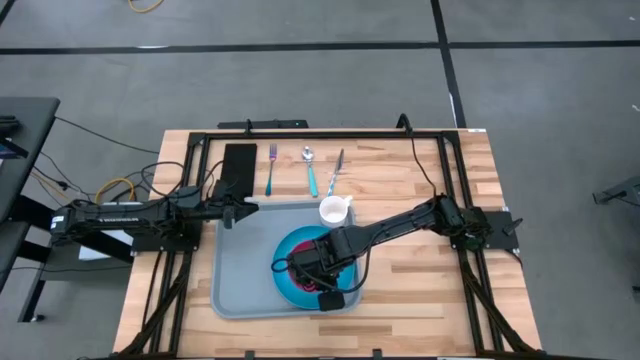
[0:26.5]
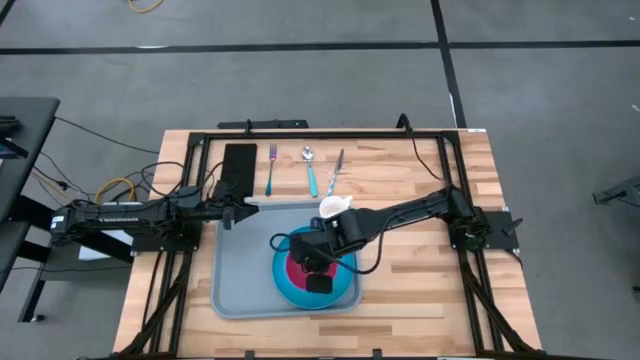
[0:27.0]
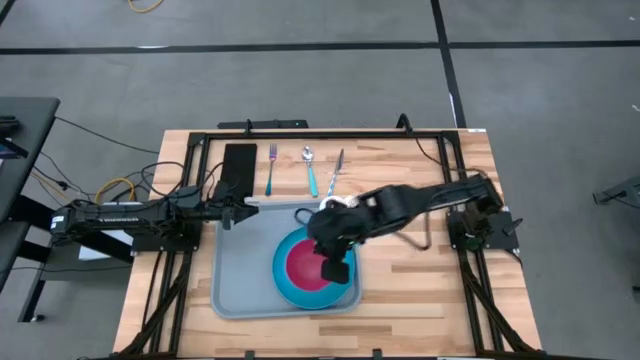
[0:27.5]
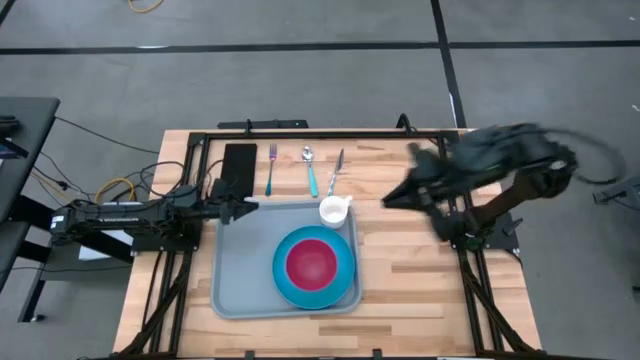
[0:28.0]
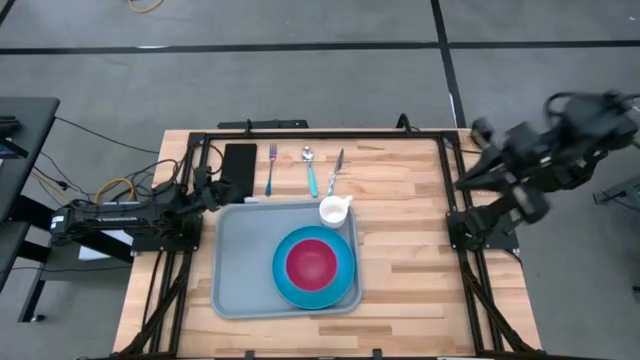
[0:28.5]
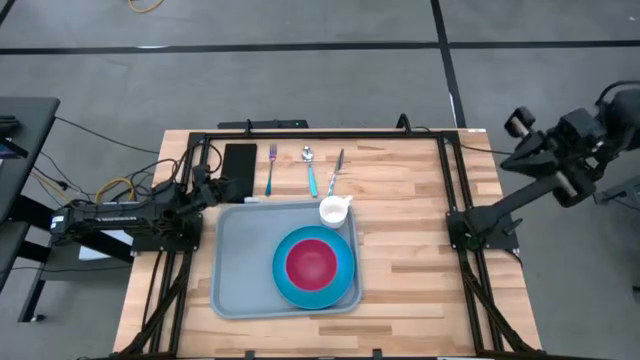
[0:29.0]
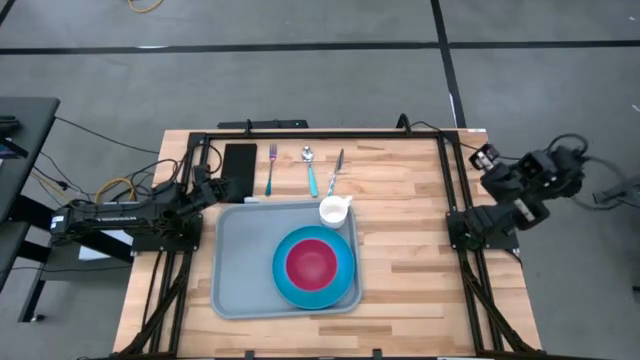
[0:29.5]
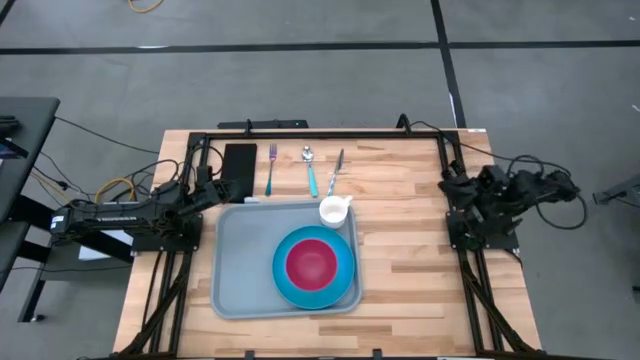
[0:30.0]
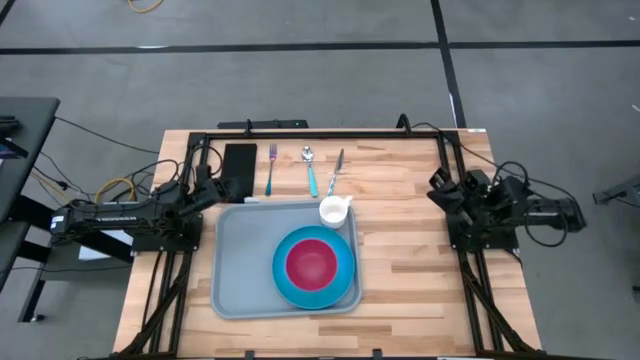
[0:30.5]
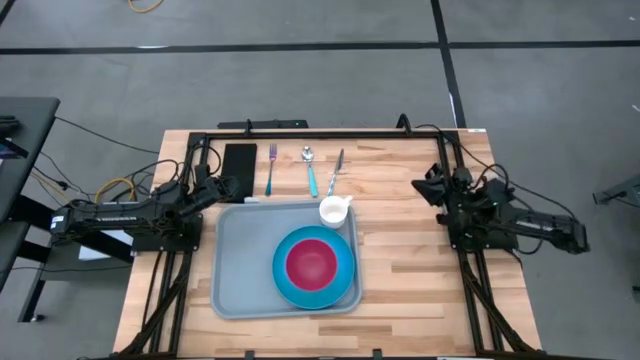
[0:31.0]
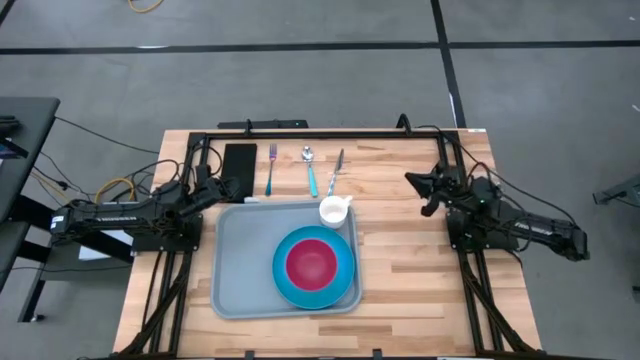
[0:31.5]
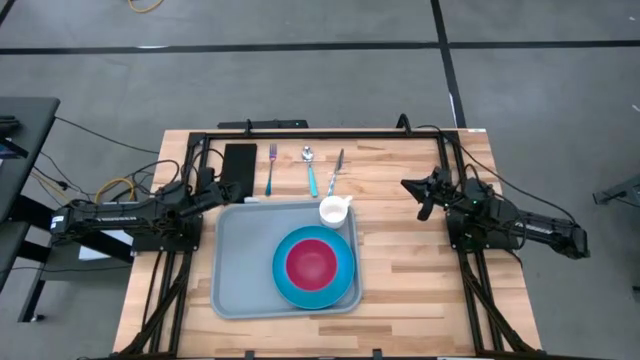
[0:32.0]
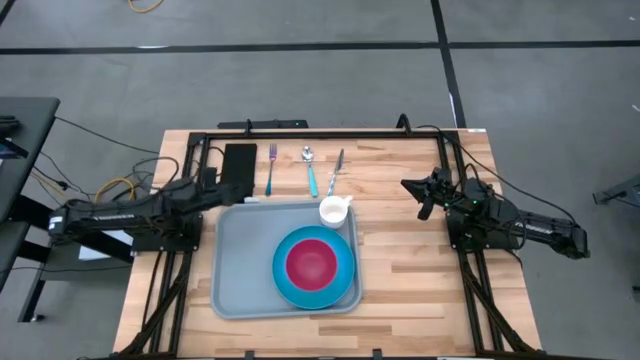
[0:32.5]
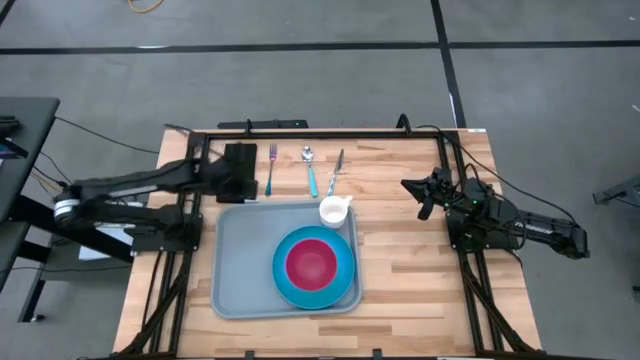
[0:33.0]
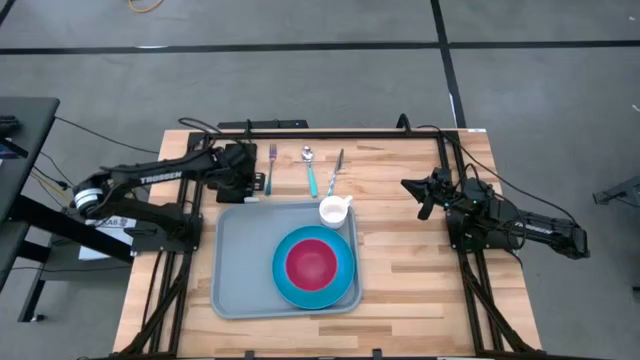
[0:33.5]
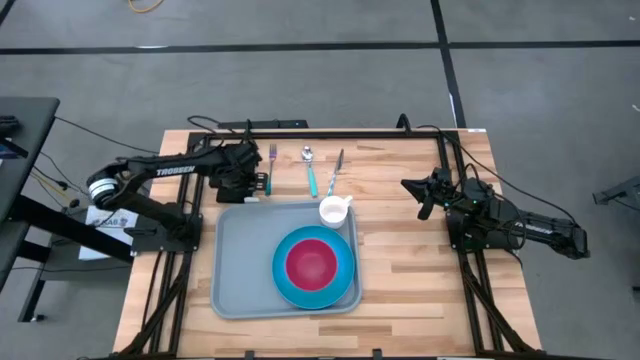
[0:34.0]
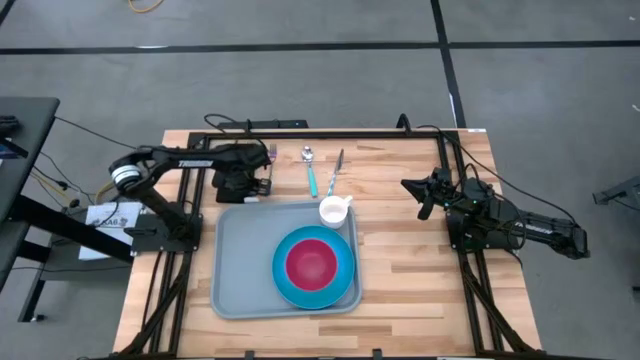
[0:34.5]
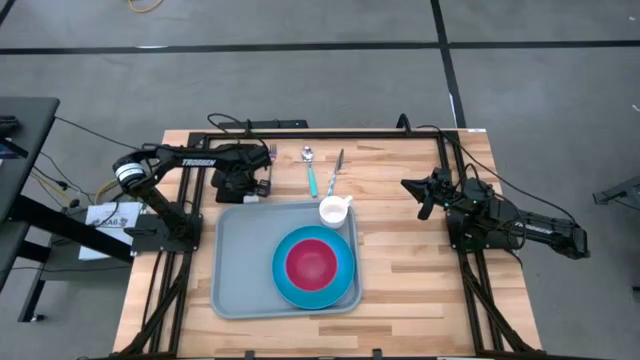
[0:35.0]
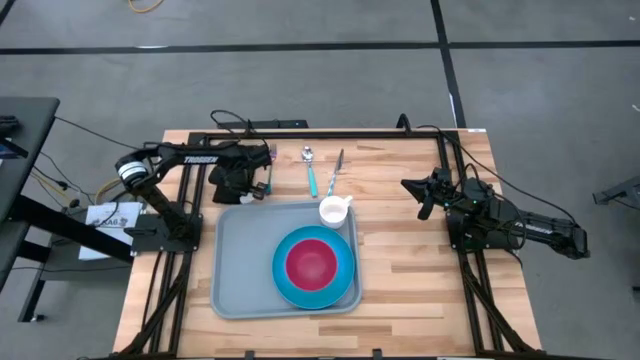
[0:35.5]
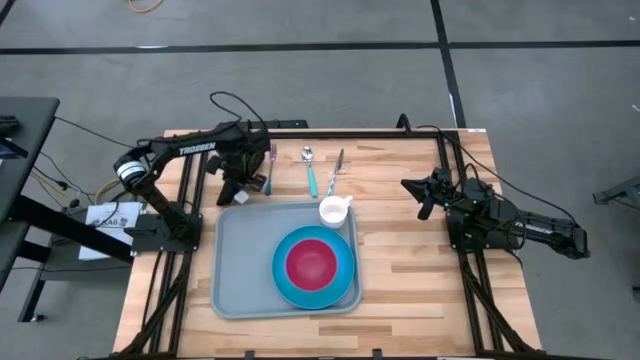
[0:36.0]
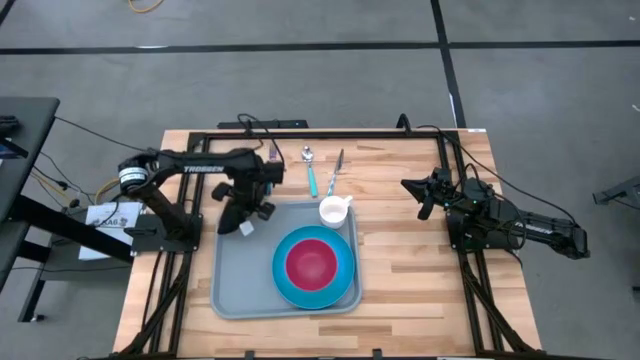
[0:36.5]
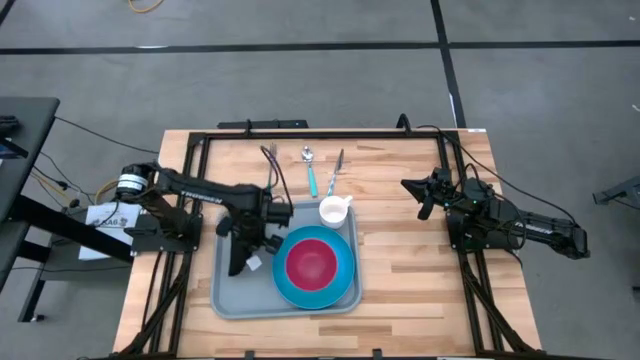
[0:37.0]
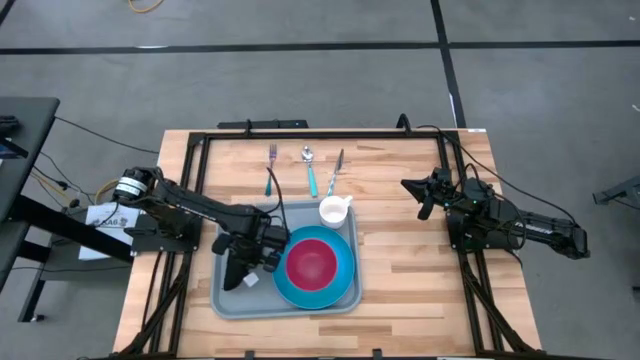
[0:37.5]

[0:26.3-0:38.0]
Task: Set up tray
Put the black napkin on the gray serving tray to the right of the blue plate

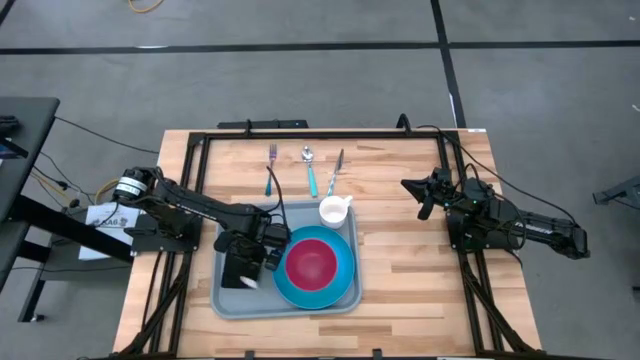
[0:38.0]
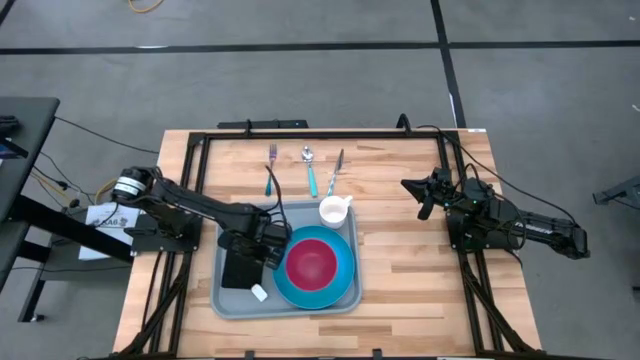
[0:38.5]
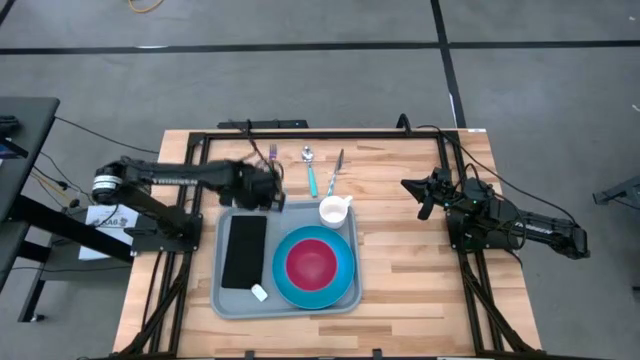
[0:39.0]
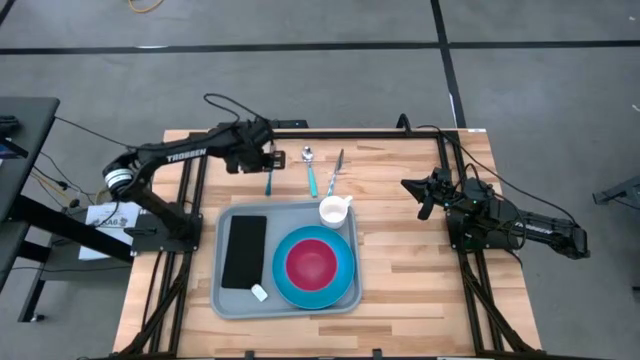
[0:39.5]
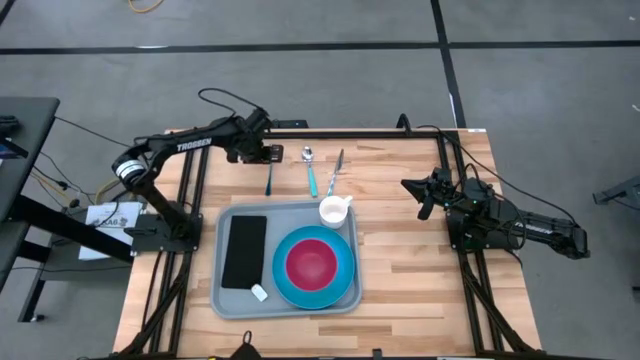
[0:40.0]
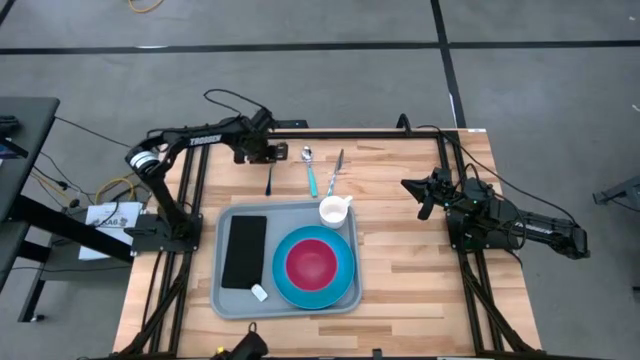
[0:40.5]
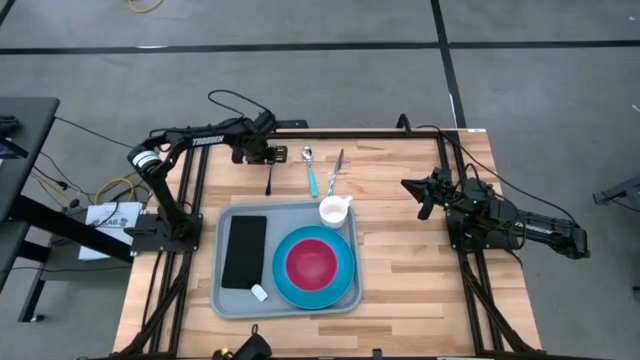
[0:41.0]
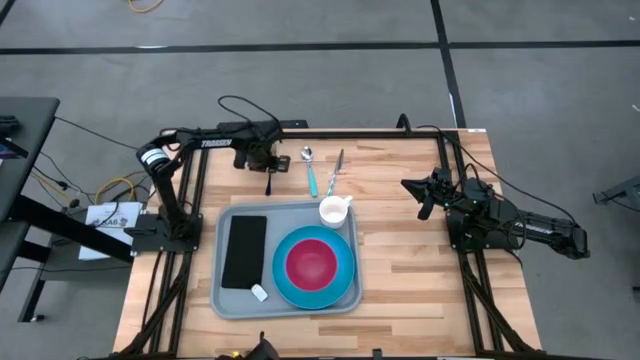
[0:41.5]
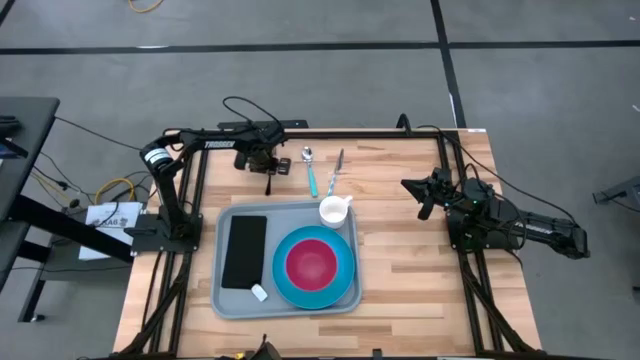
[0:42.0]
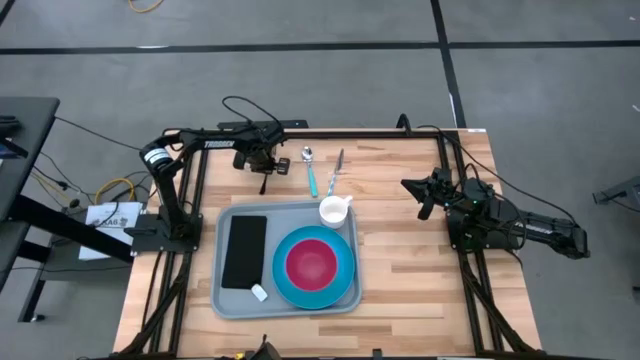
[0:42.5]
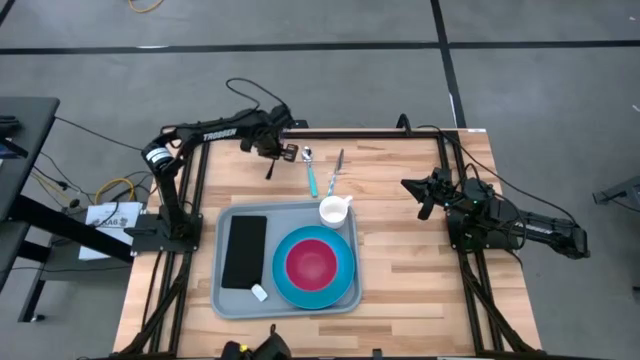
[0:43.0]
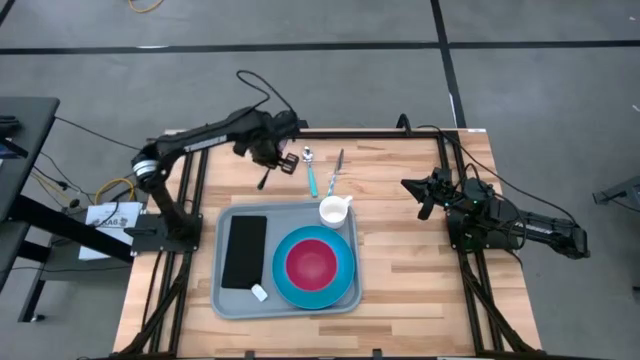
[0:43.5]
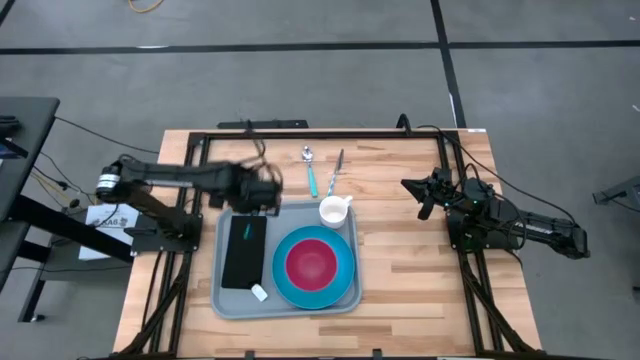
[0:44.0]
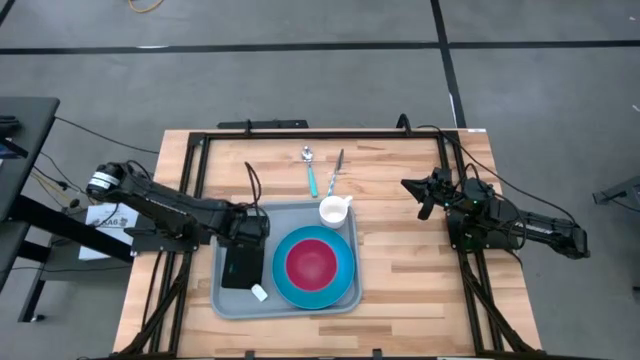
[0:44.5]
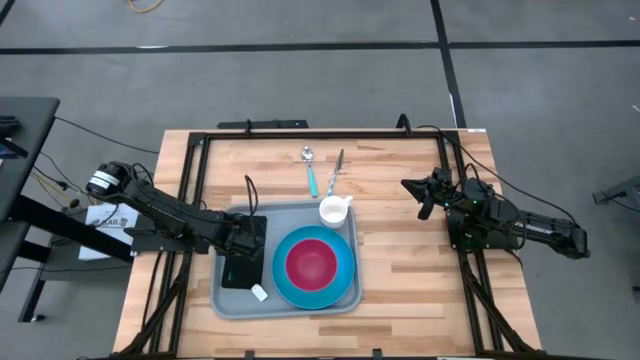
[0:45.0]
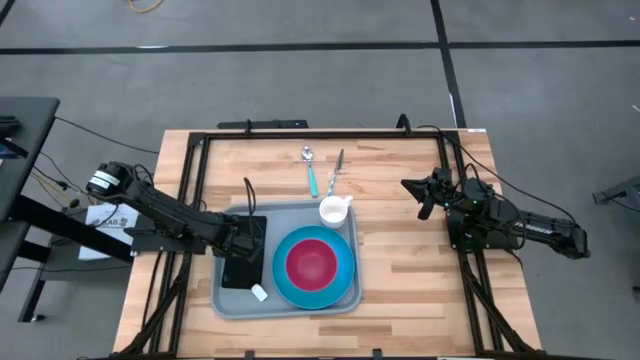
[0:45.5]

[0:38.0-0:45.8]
Put the blue fork on the black napkin

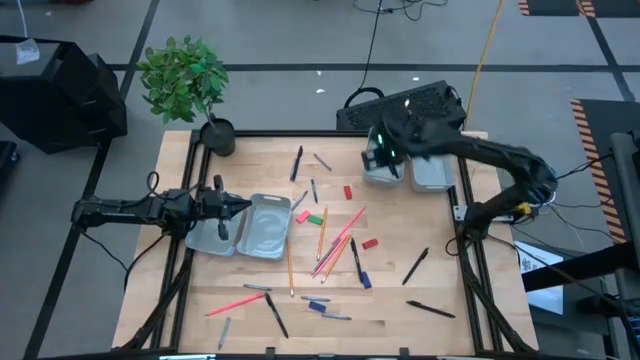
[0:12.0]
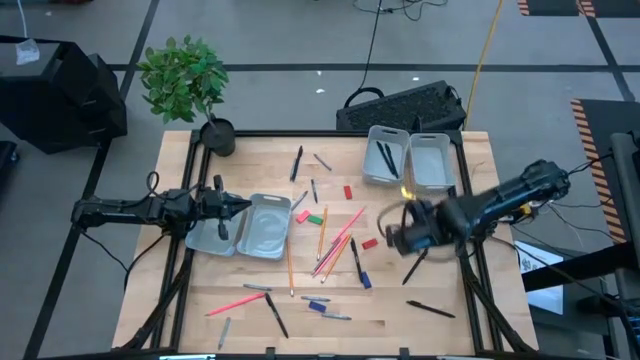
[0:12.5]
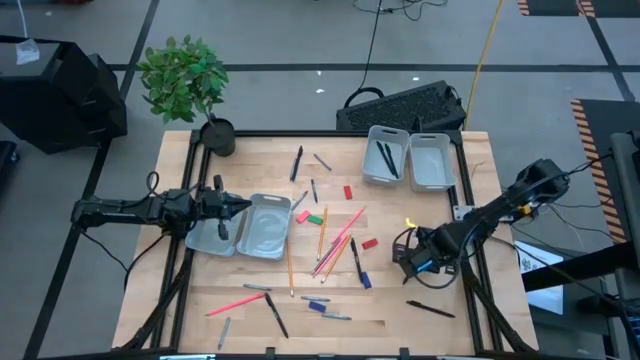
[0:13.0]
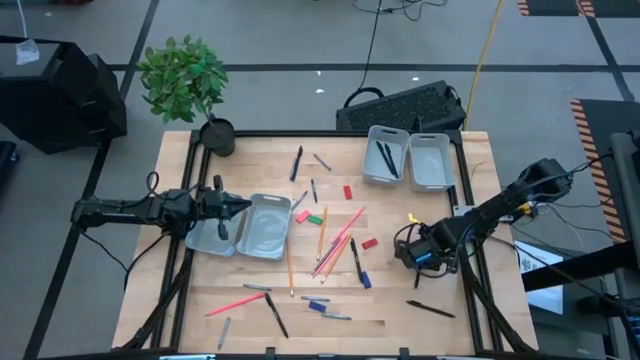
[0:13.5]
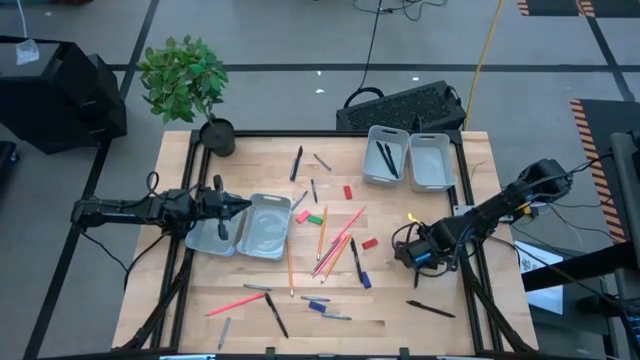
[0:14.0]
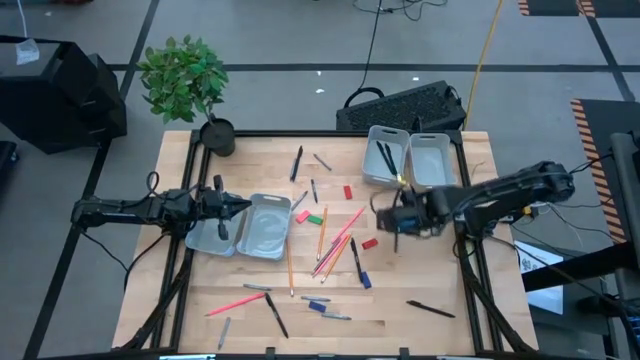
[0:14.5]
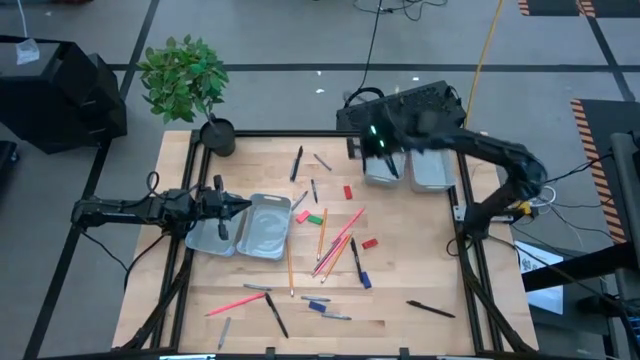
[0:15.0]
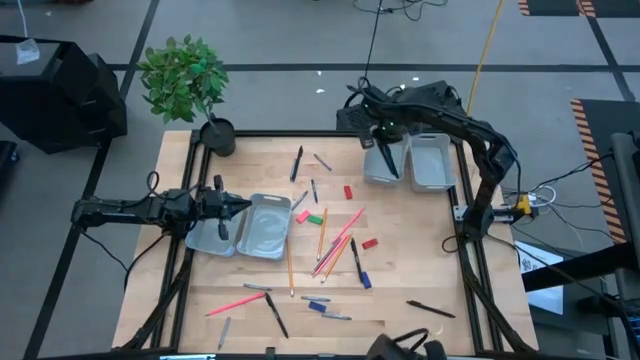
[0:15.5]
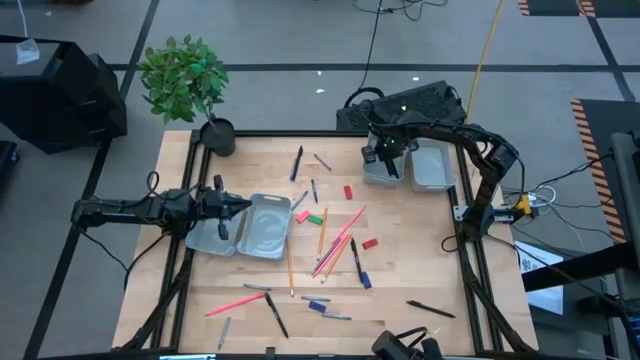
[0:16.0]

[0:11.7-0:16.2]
Task: Sort crayons/erasers/pens/pencils in bins
Put the black pen into the top left gray bin
